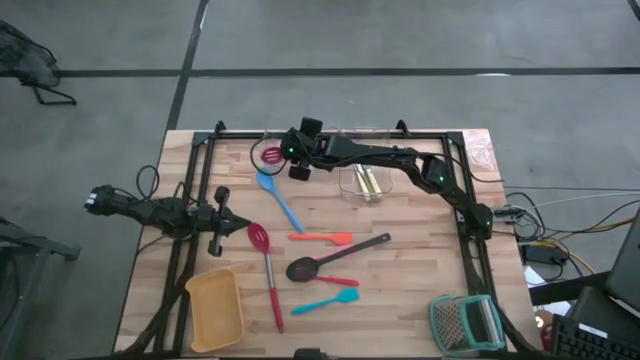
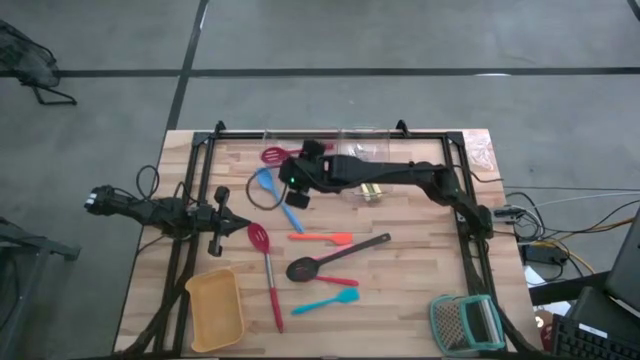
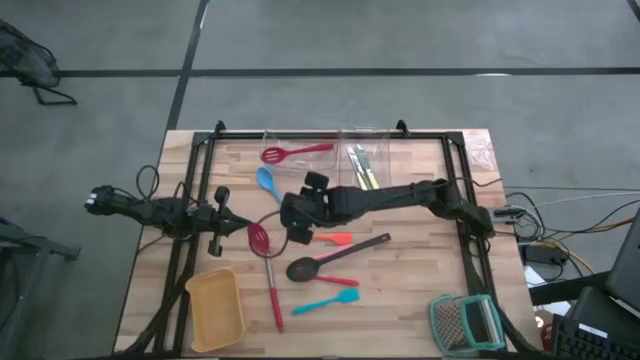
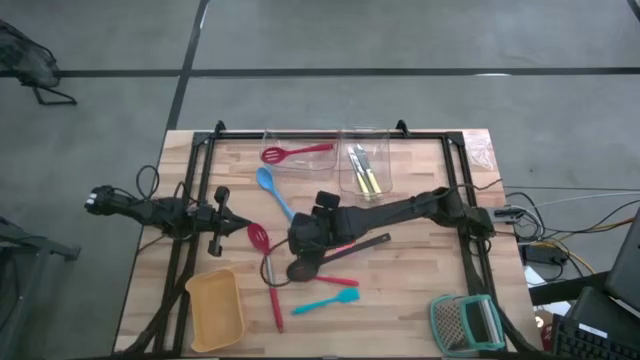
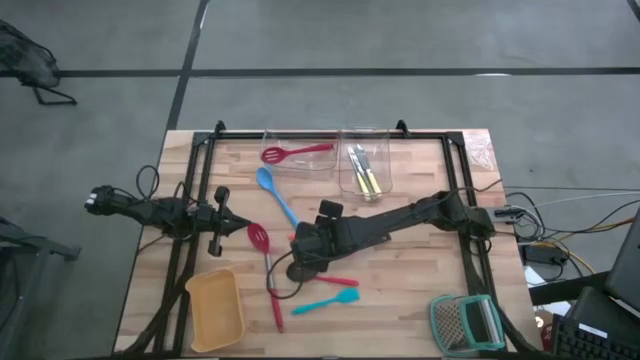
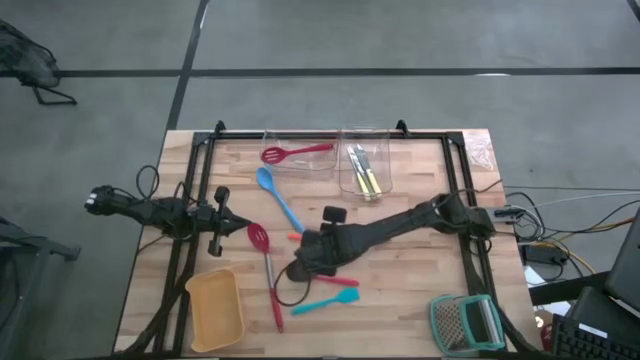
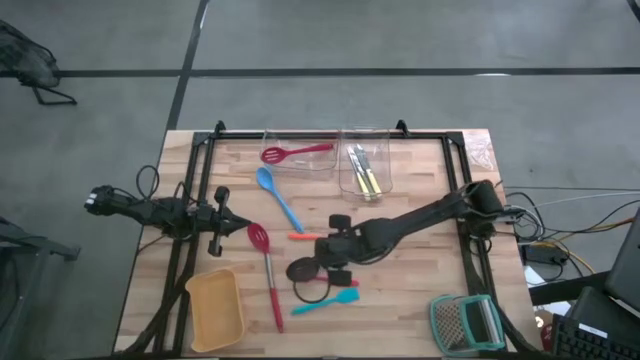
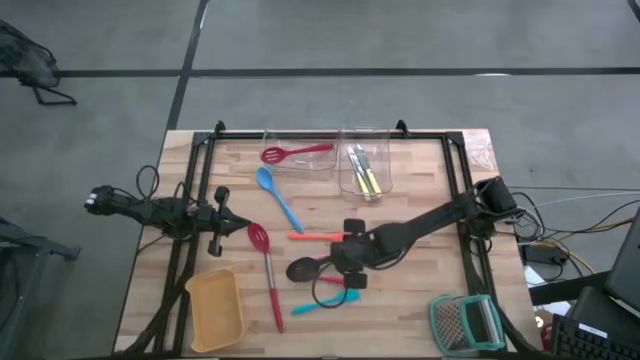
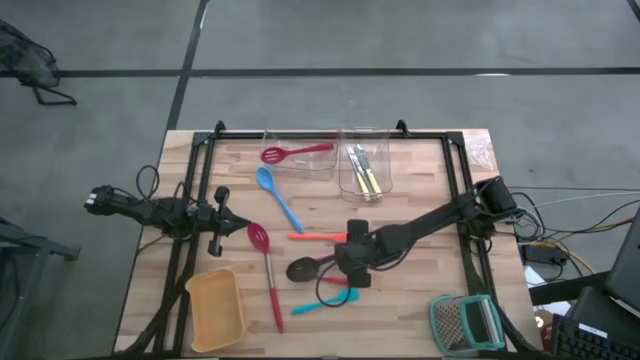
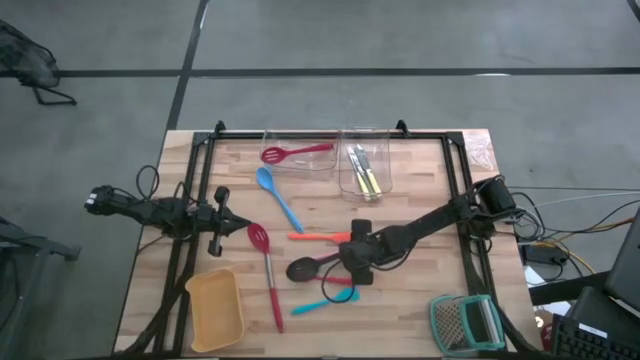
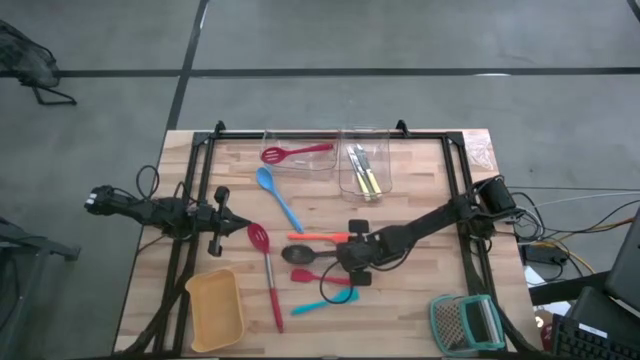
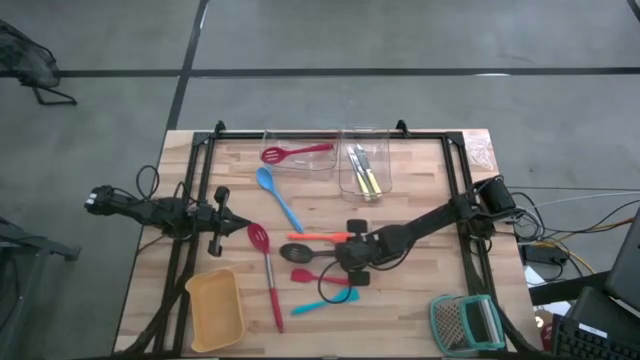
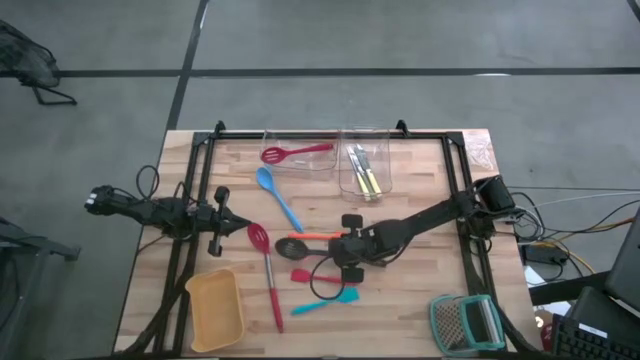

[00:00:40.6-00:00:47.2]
Task: Pick & Place Kitchen Items
Put the black serving spoon into the left transparent bin

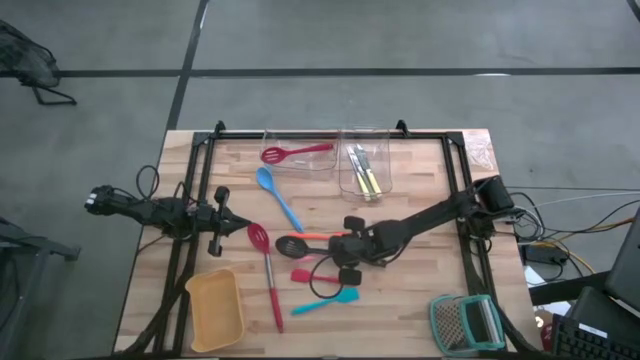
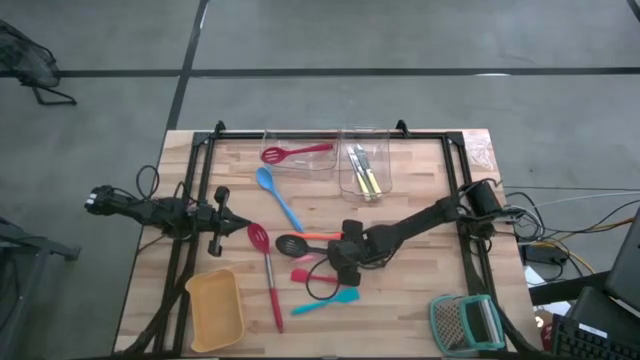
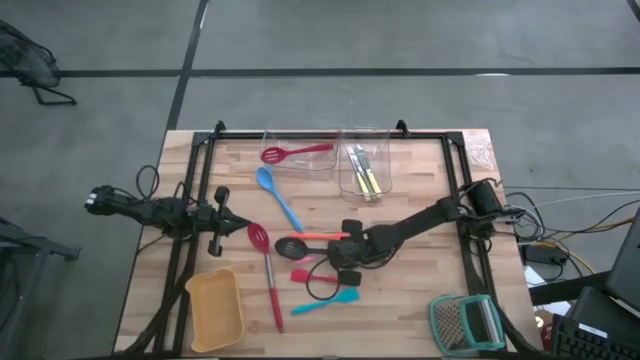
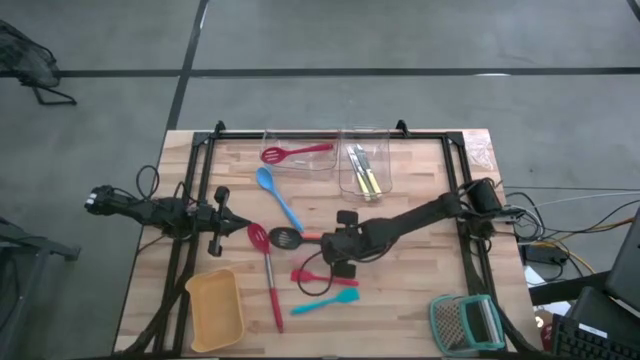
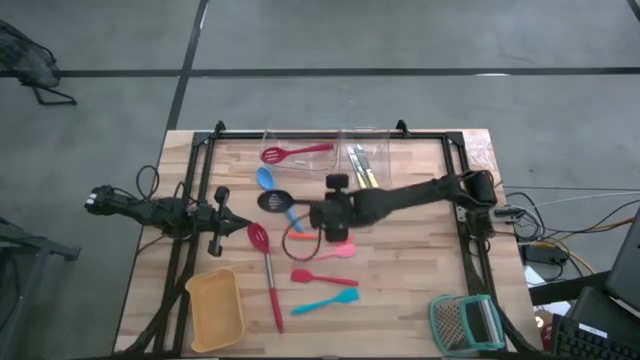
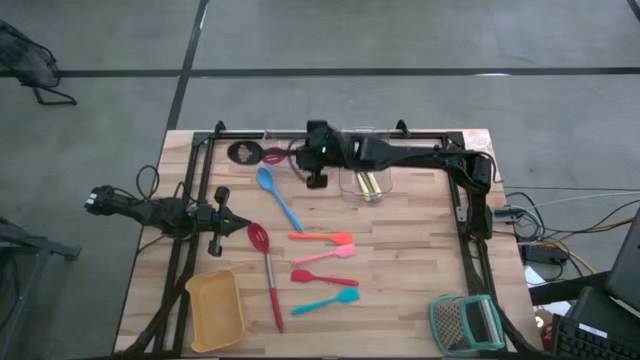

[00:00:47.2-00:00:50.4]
Put the black serving spoon into the left transparent bin

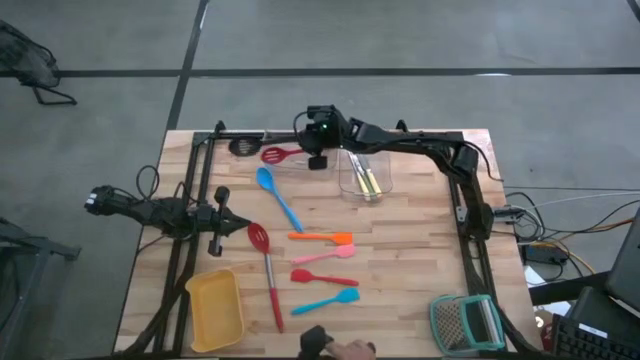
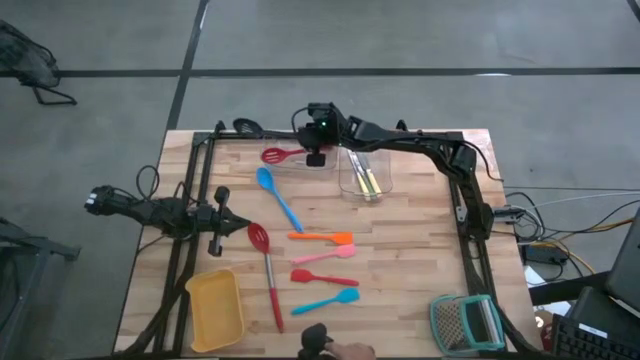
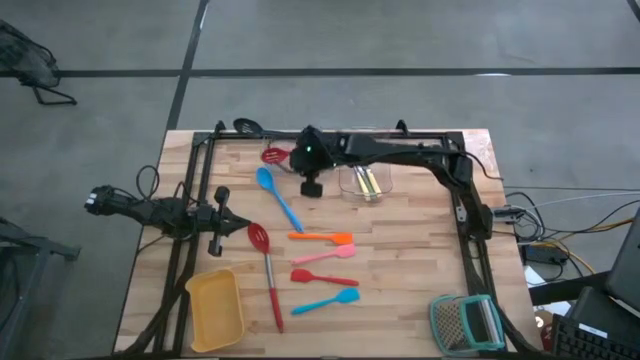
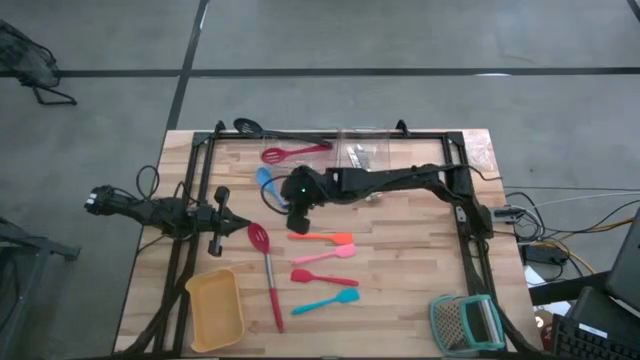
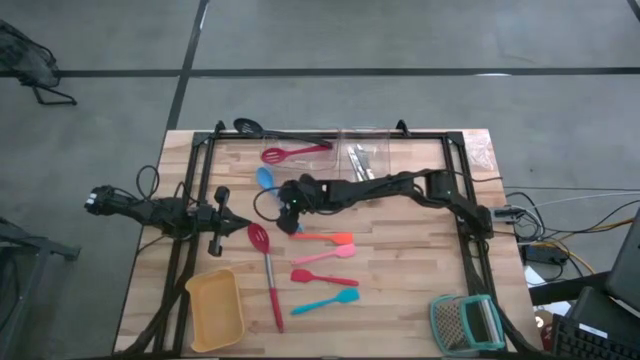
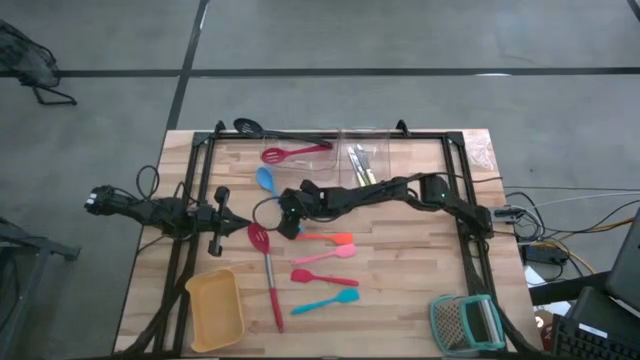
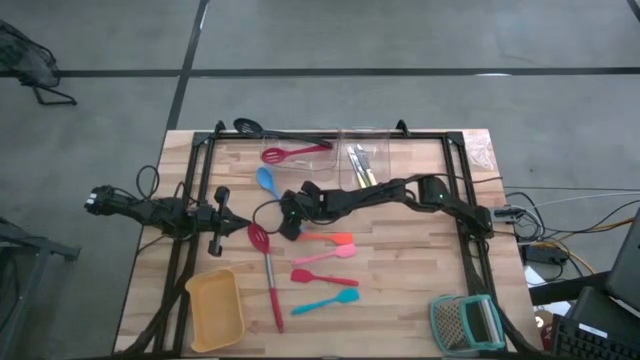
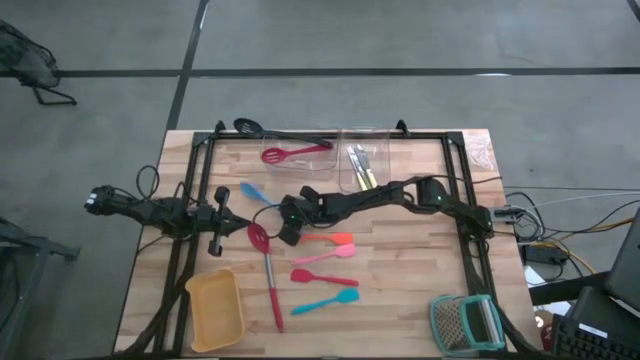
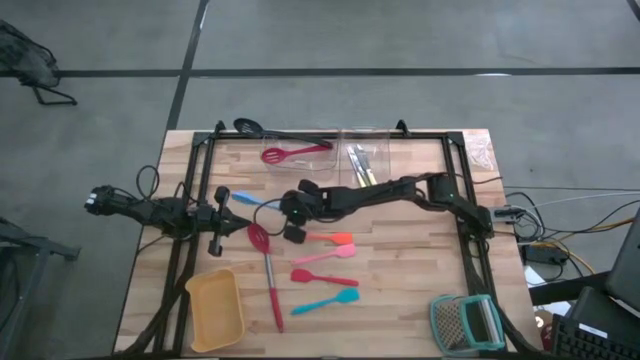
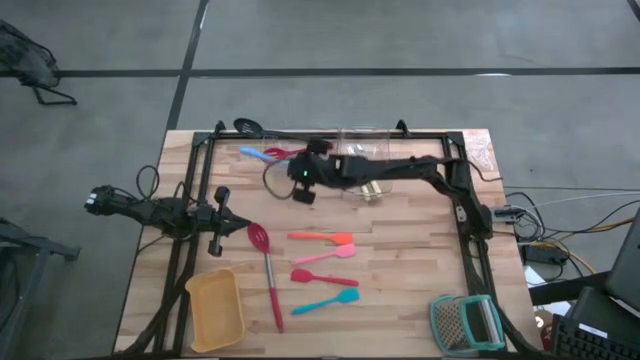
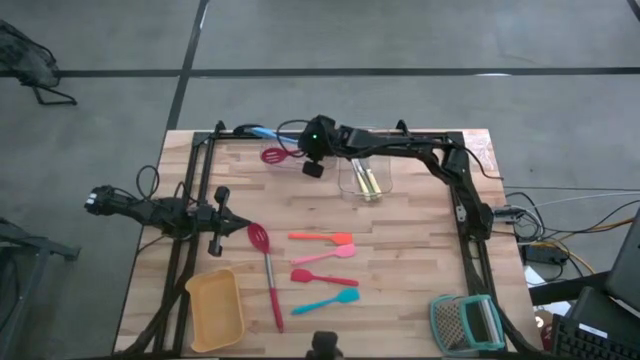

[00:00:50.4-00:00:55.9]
Put the blue serving spoon into the left transparent bin

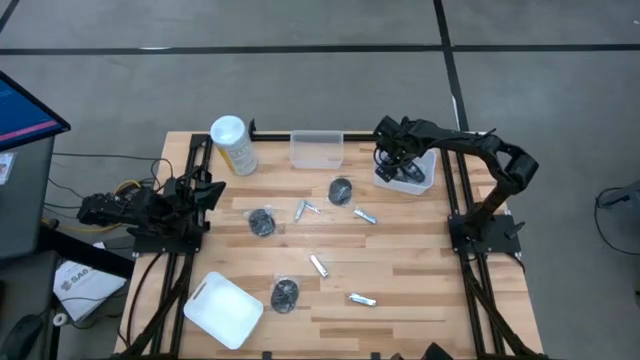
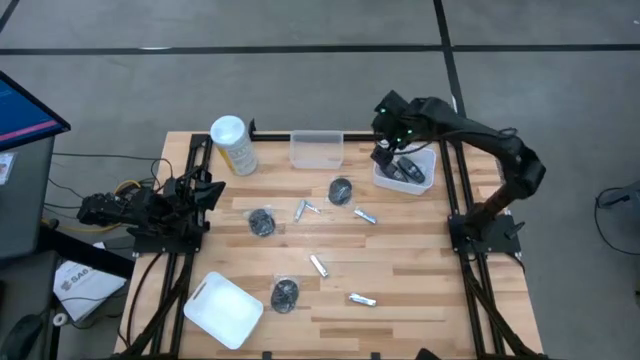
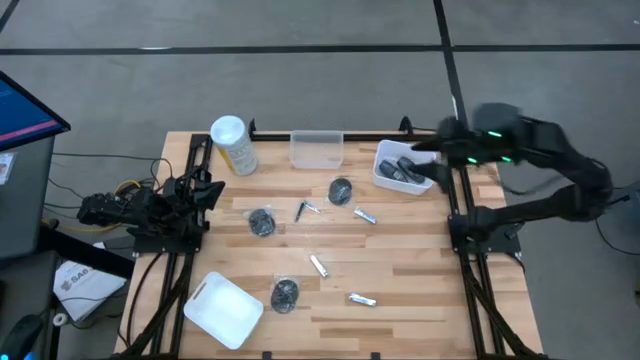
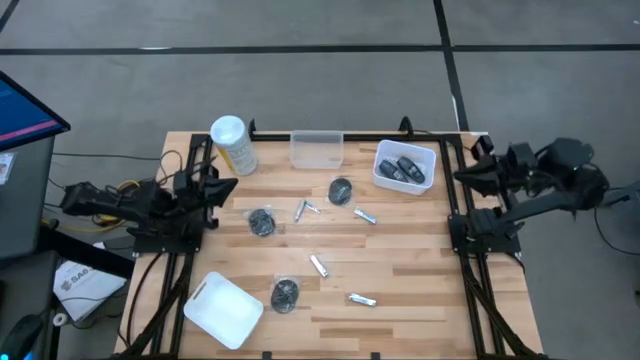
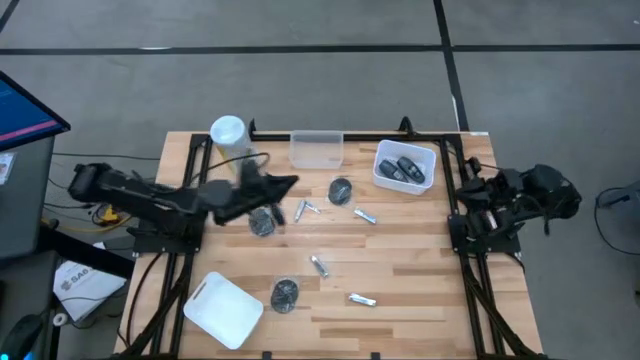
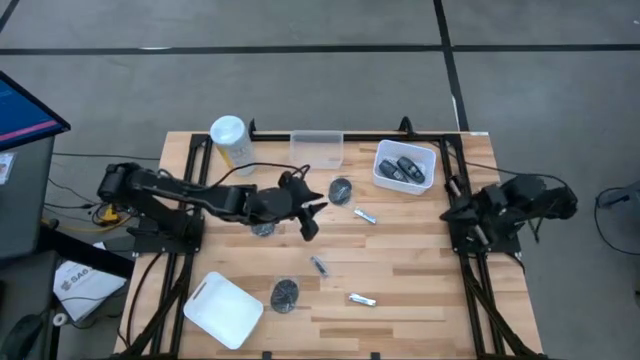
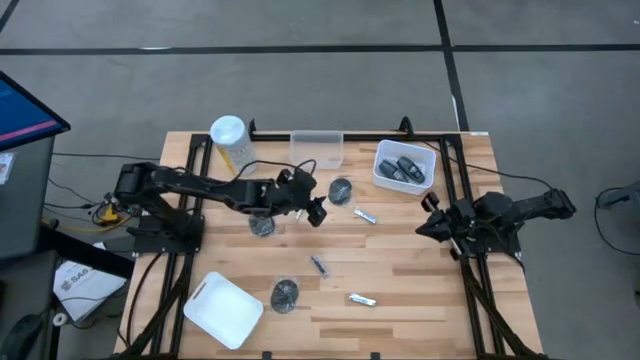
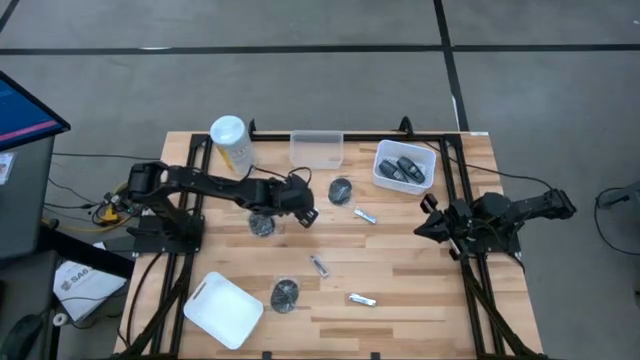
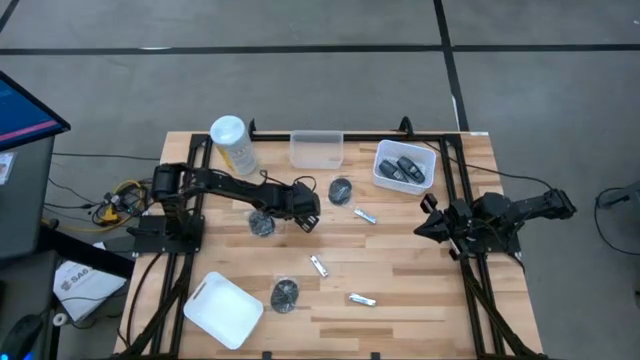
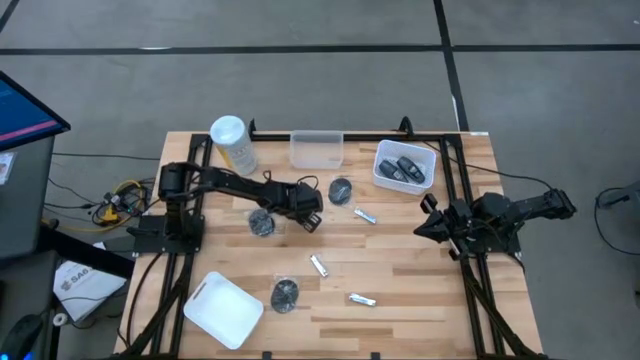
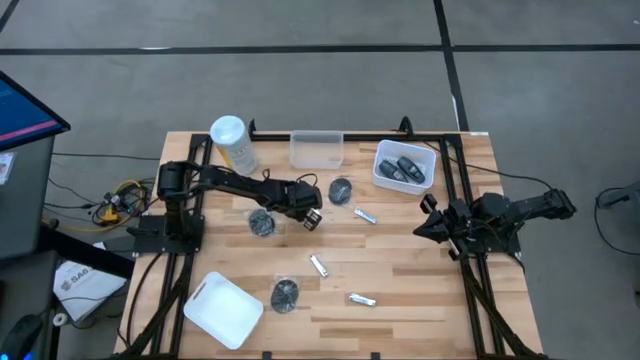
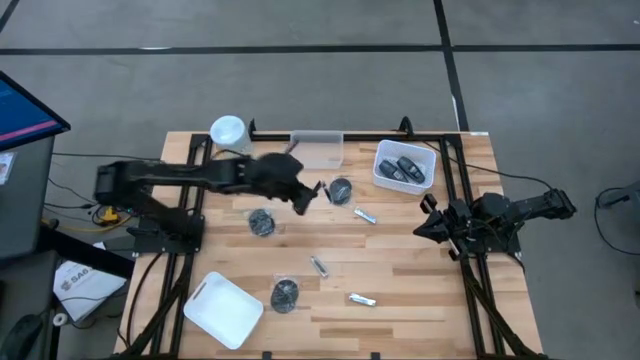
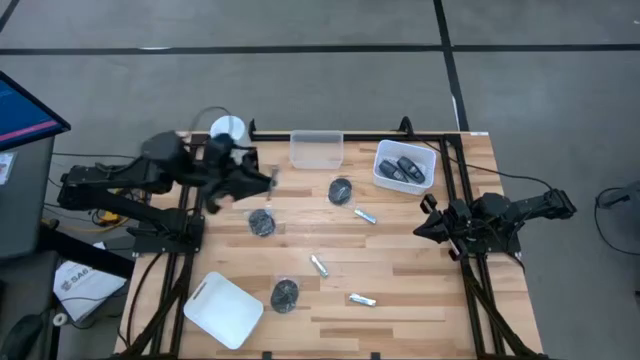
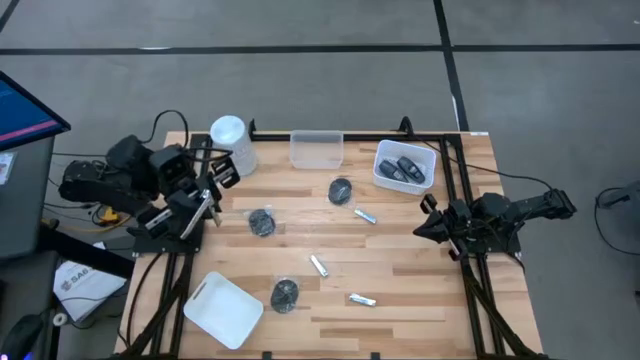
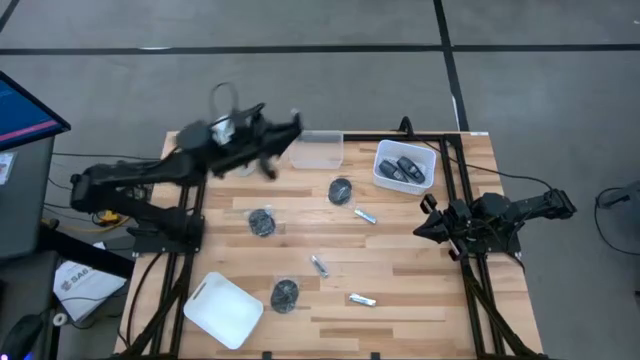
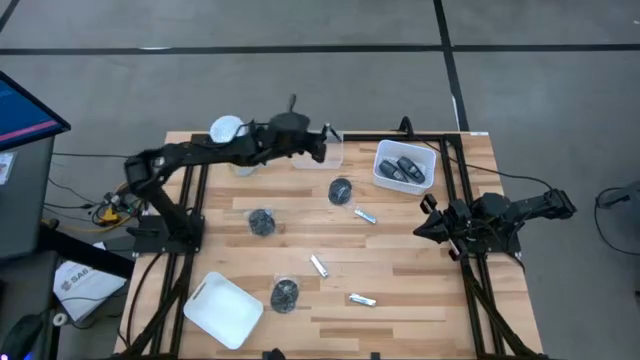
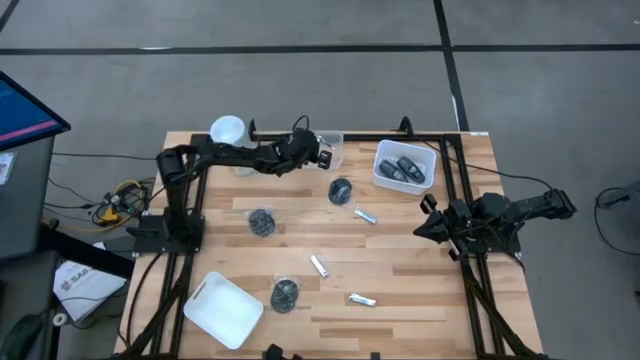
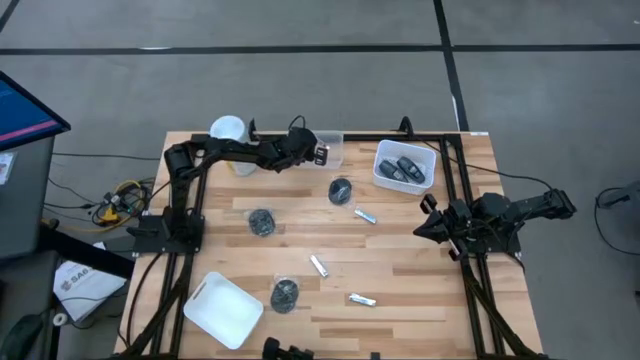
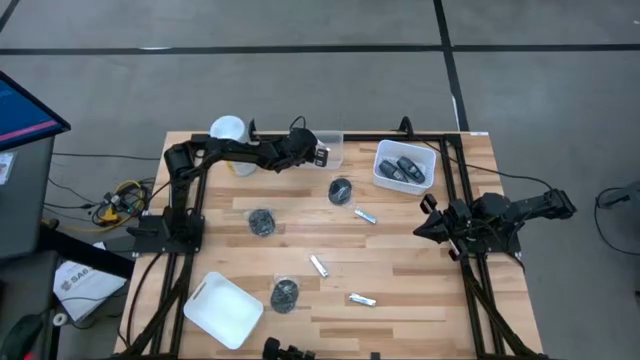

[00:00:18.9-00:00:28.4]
Task: Pick & Place Travel size toiletries
Put the silver nail cutter into the transparent bin
